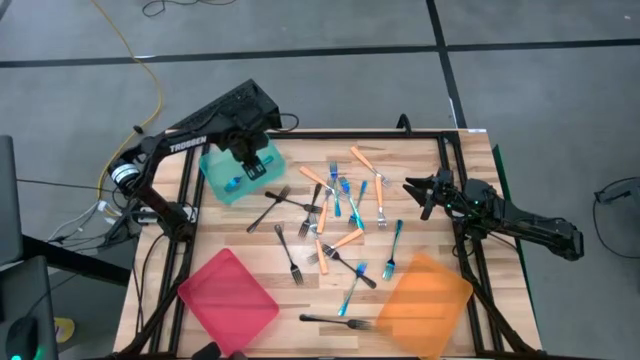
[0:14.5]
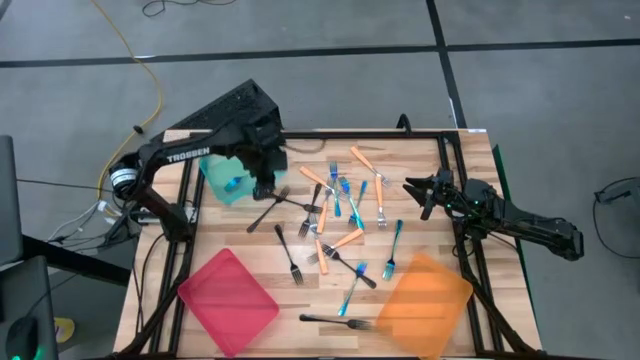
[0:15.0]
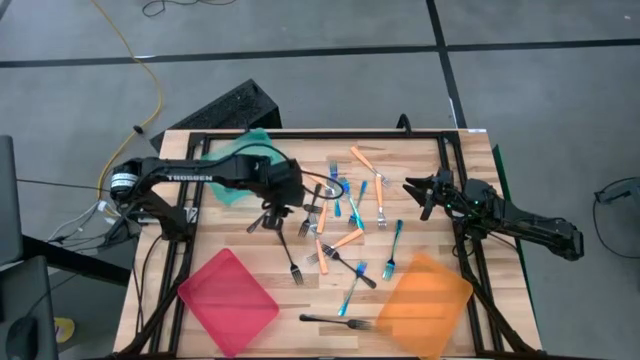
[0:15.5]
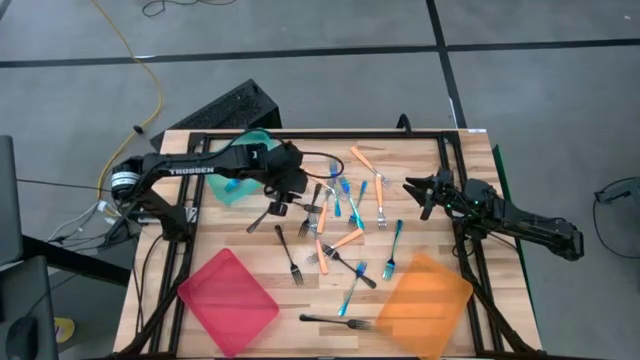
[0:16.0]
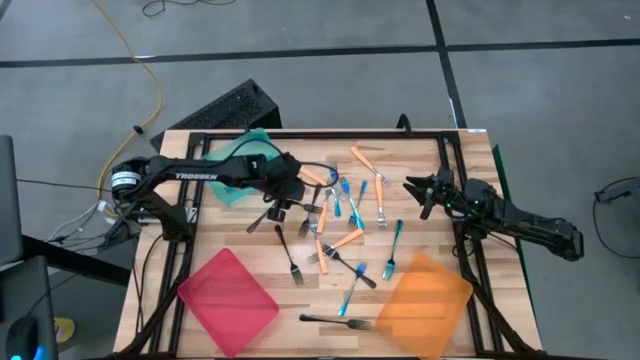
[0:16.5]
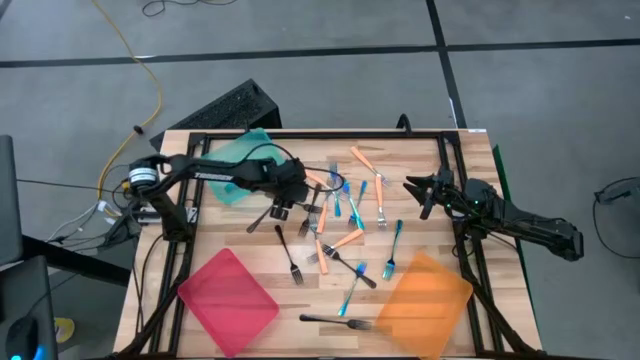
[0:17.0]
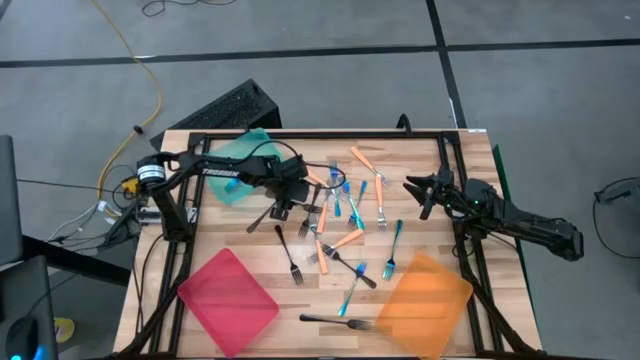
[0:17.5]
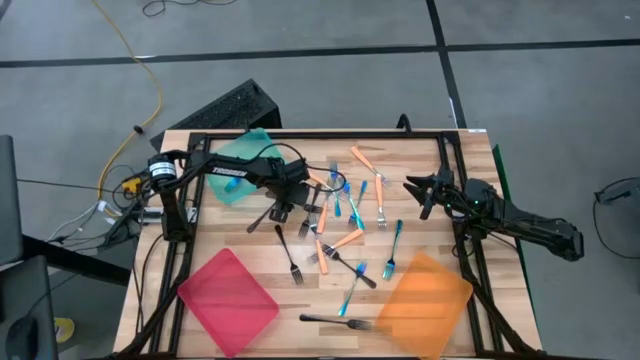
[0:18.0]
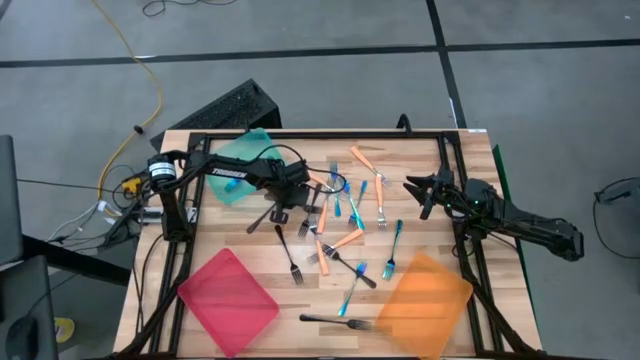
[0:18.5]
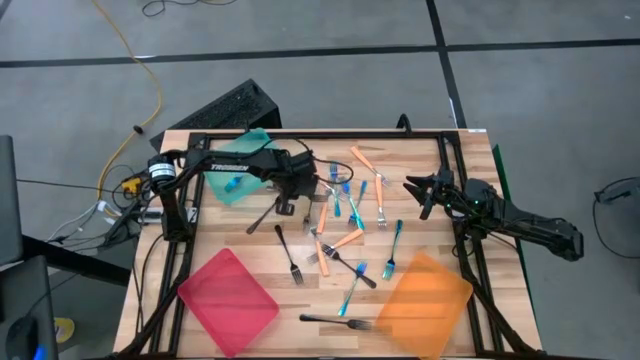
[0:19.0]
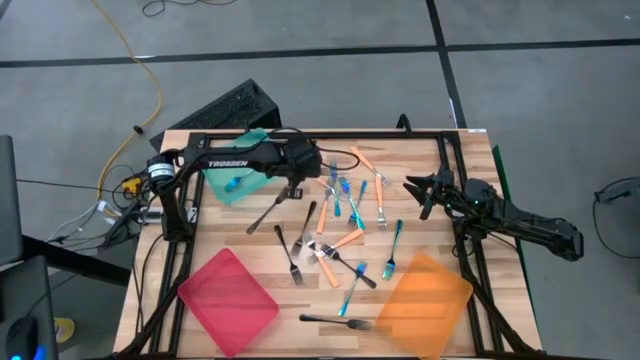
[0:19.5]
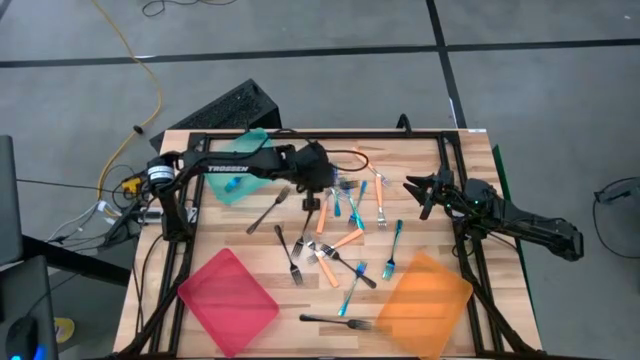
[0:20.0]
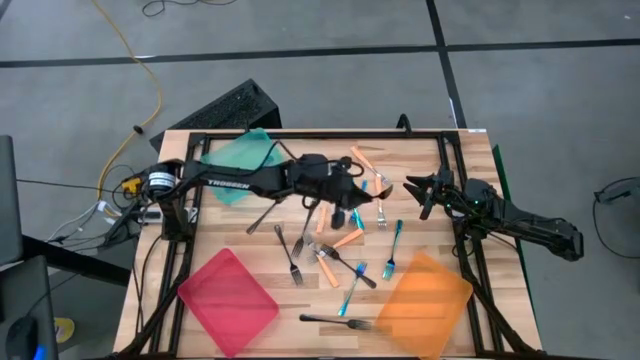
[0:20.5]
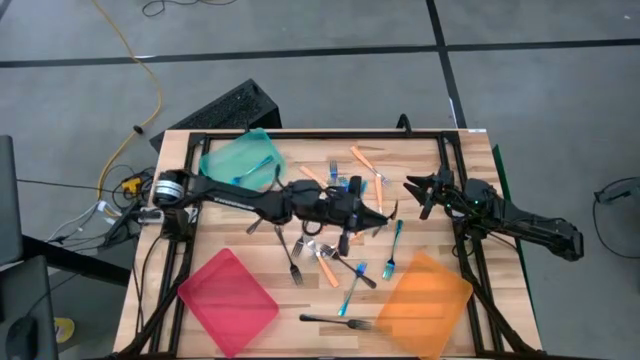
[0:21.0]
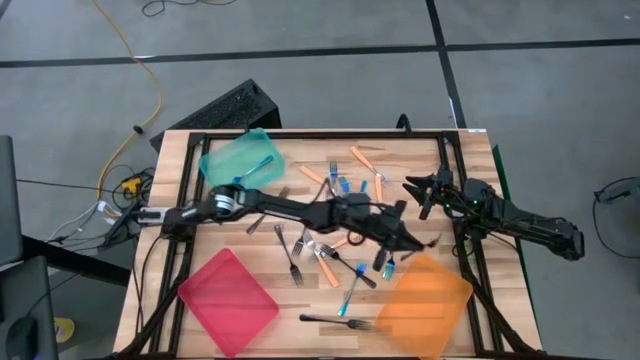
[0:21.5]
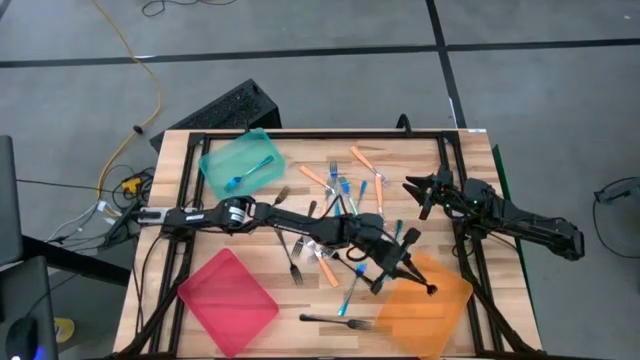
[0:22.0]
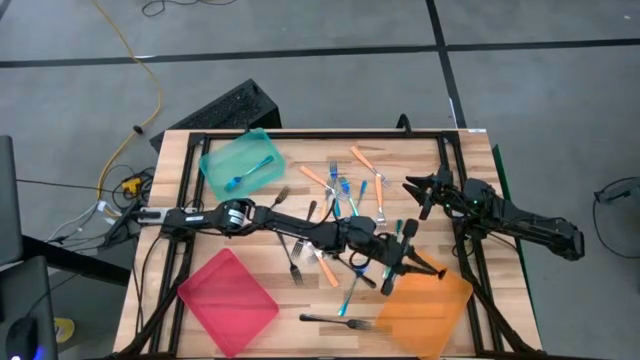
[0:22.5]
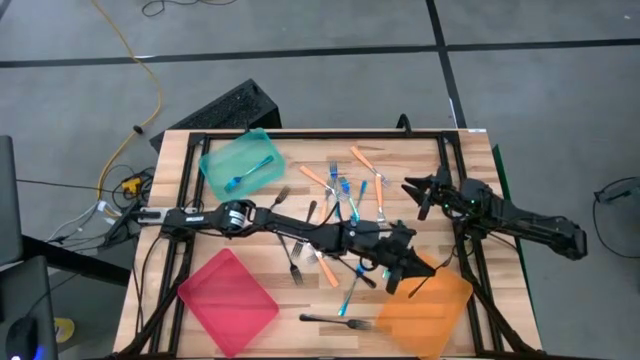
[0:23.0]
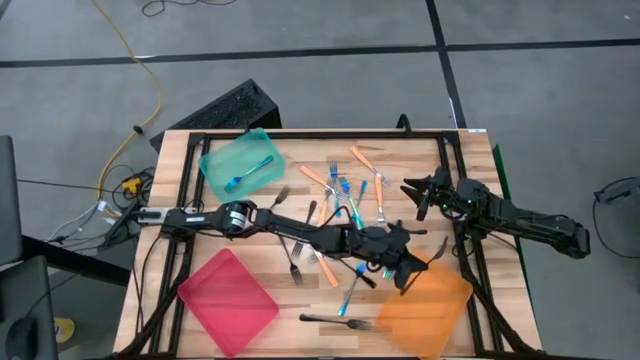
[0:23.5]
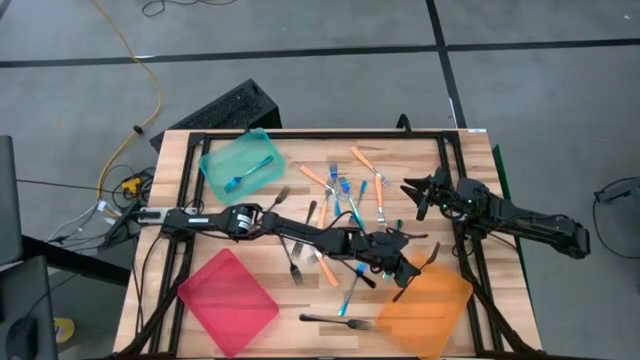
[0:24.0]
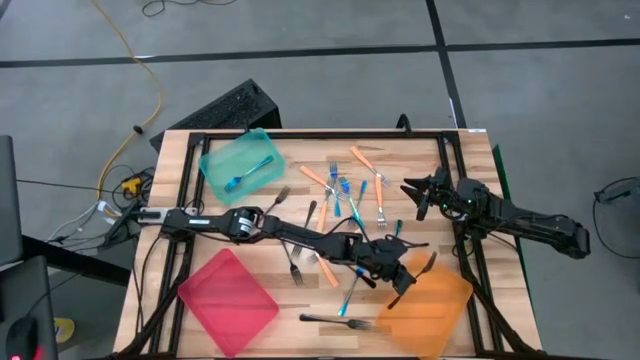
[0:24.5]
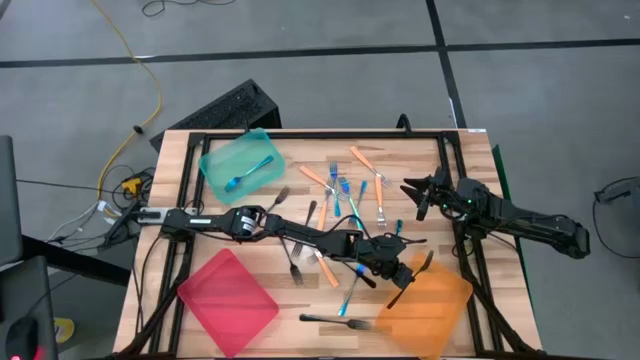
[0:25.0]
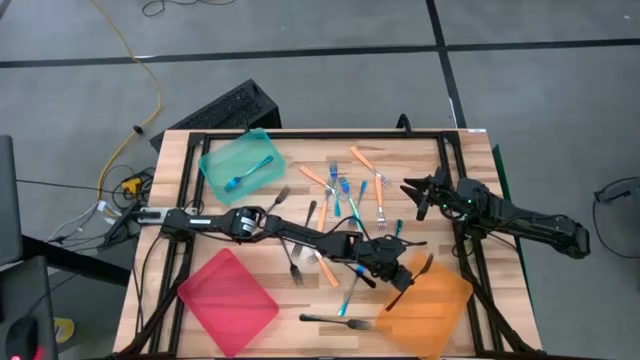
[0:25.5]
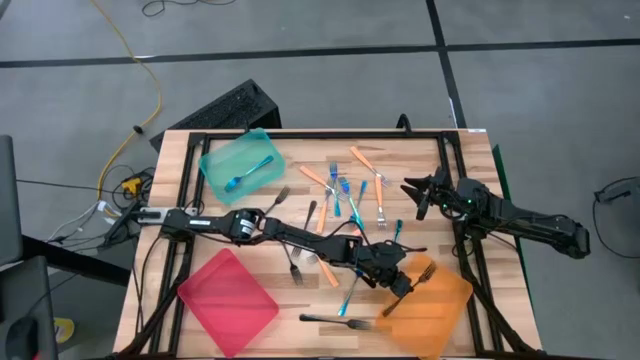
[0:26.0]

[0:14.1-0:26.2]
Task: Sort silverware by color (type)
Put the black fork into the orange bin

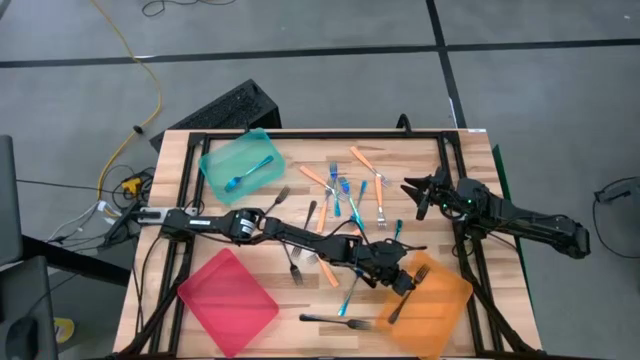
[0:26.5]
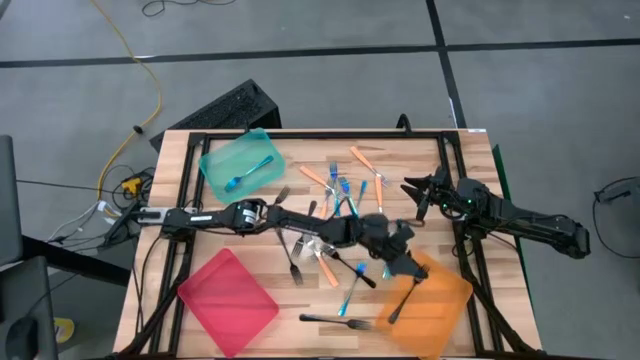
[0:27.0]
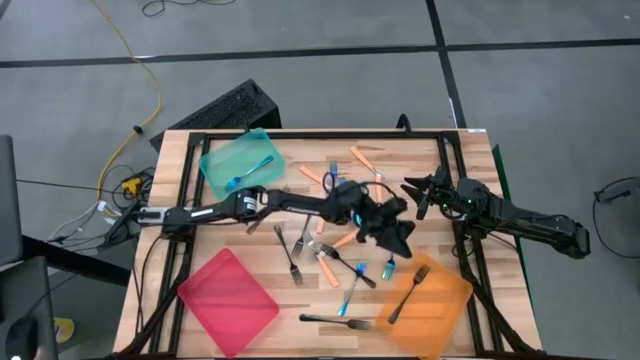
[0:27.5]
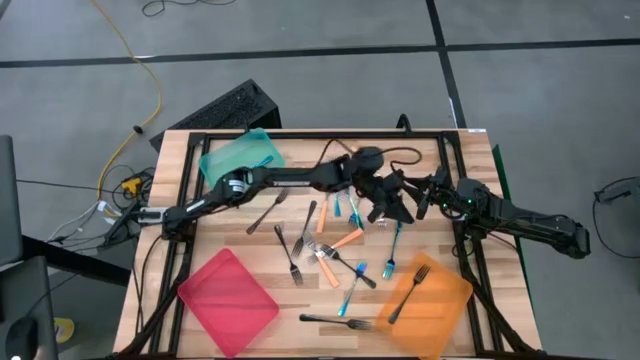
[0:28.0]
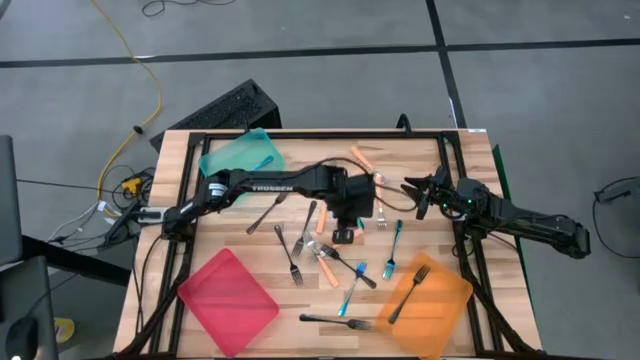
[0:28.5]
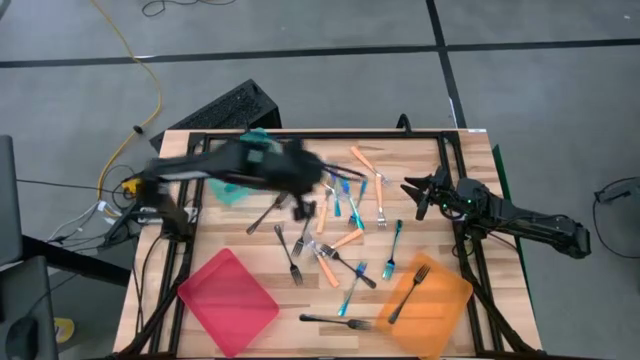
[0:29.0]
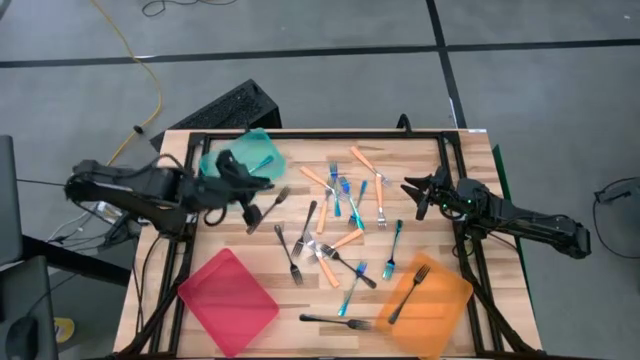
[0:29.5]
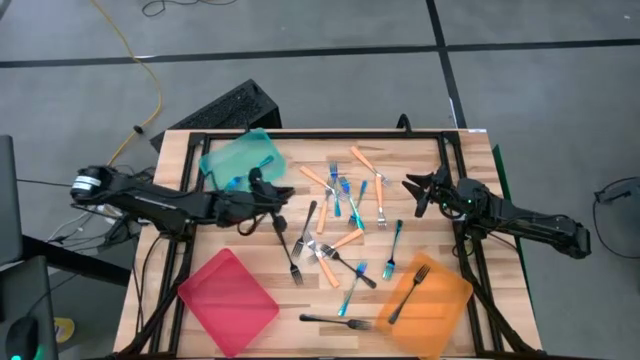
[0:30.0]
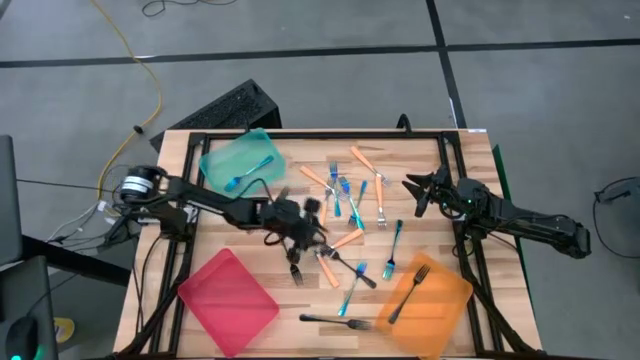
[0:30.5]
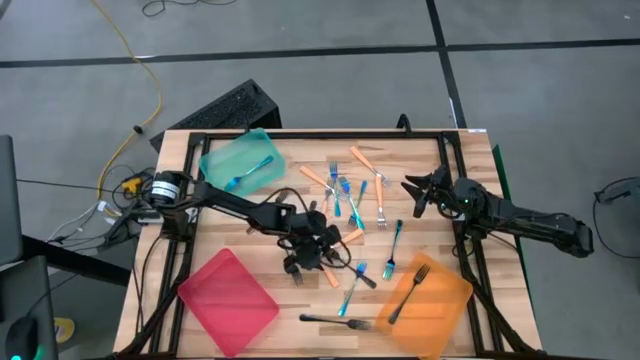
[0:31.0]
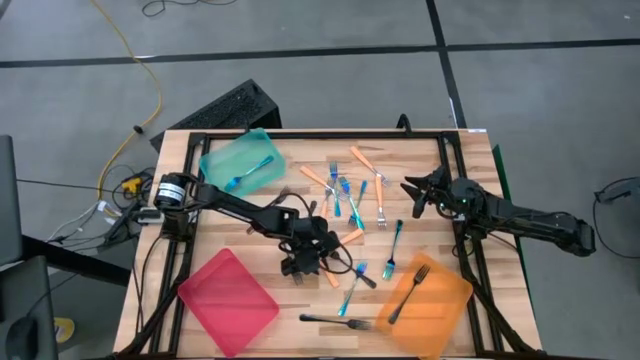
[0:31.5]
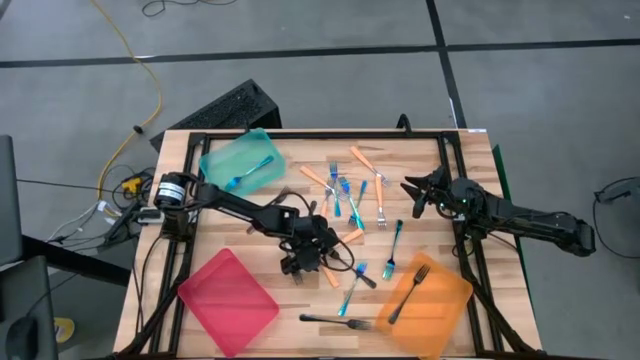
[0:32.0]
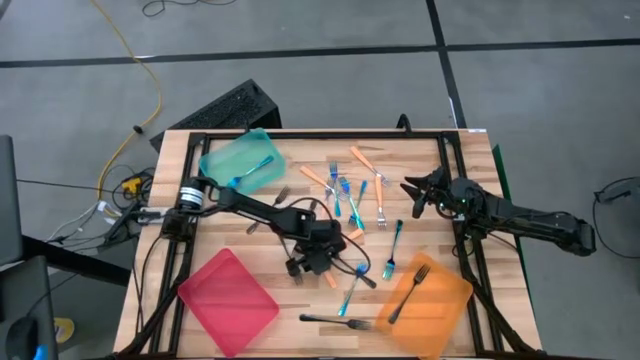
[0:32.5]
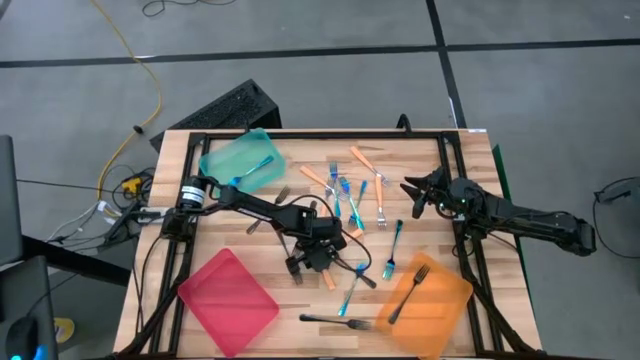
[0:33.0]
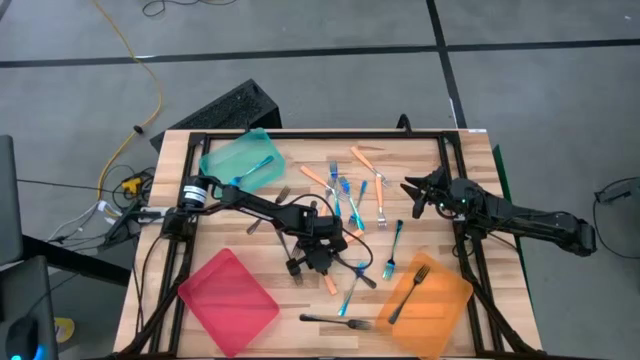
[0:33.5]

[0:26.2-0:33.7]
Put the orange fork into the red bin

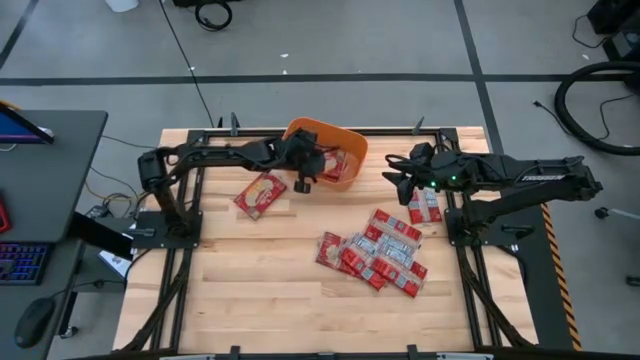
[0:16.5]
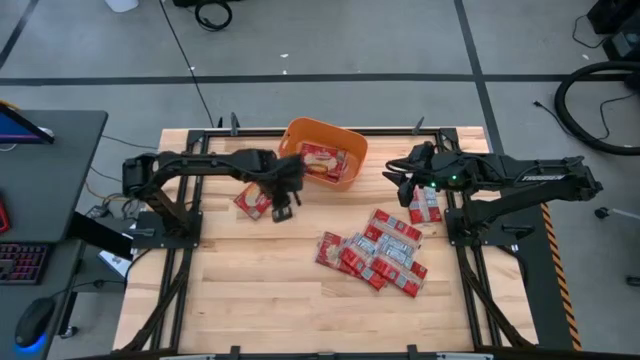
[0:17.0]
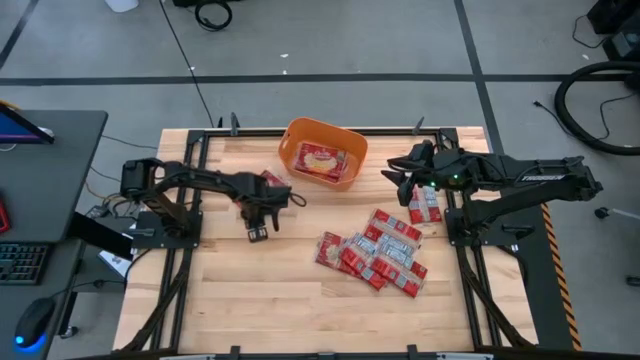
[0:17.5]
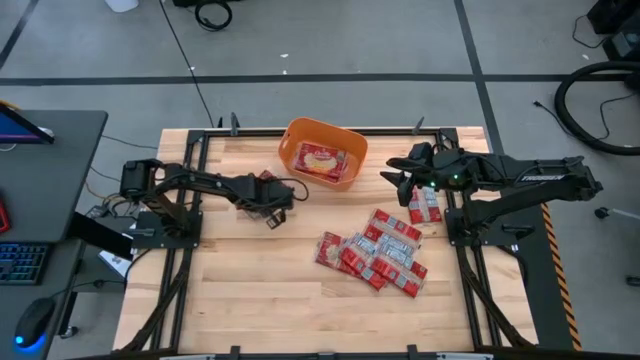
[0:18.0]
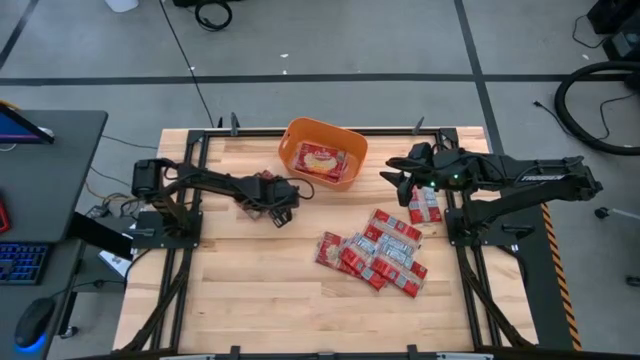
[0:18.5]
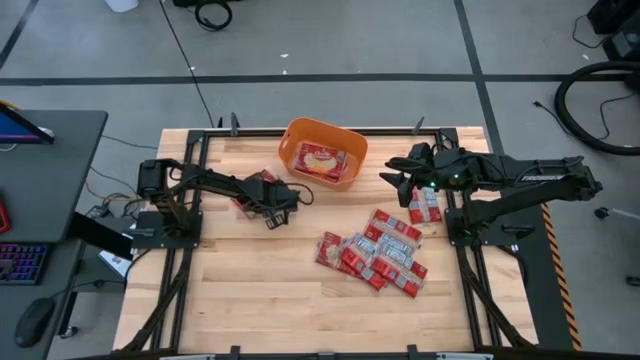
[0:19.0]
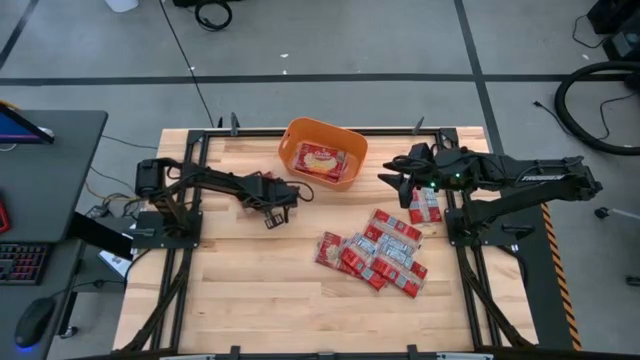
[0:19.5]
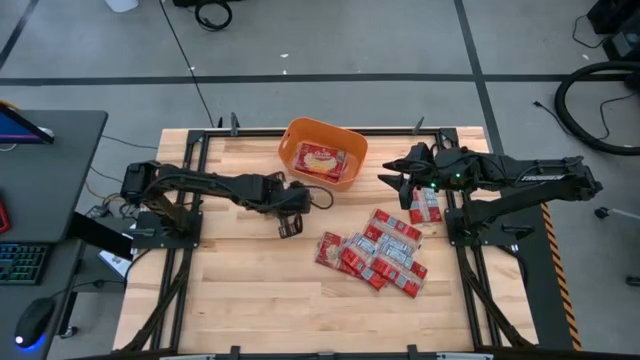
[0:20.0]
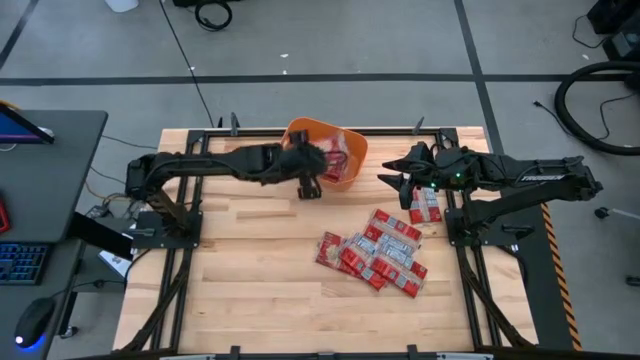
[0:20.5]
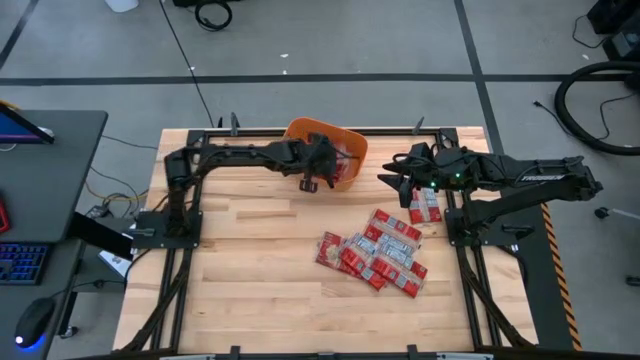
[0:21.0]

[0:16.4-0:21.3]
Task: Sort popcorn bags into baskets
Put the red popcorn bag into the orange bin
